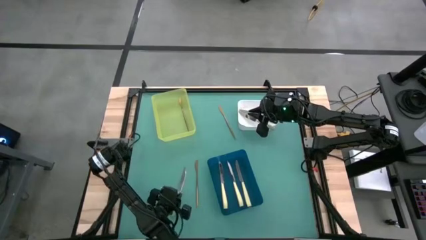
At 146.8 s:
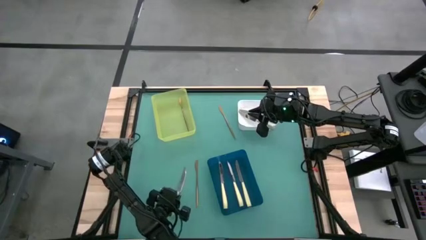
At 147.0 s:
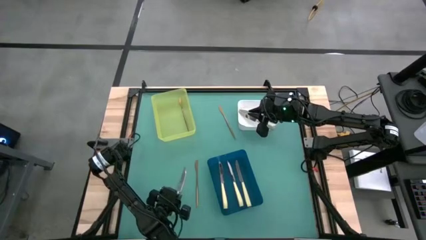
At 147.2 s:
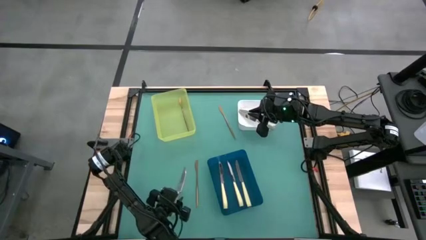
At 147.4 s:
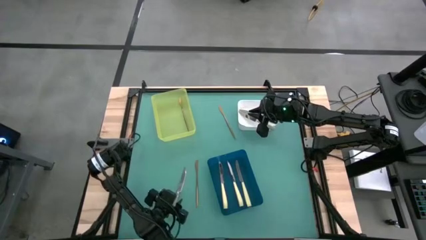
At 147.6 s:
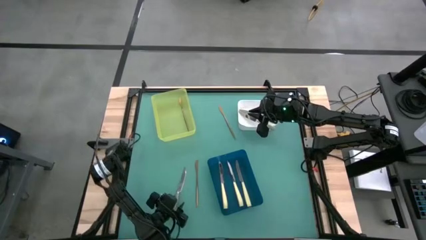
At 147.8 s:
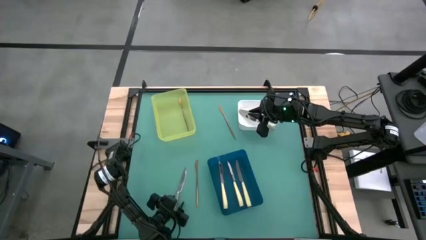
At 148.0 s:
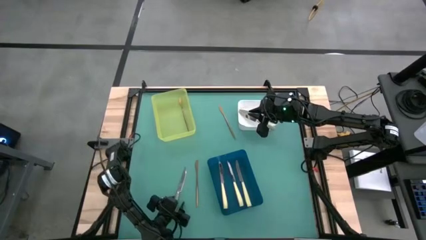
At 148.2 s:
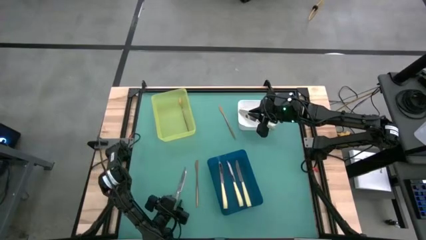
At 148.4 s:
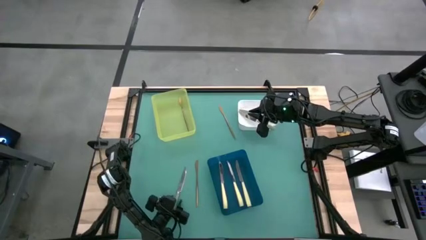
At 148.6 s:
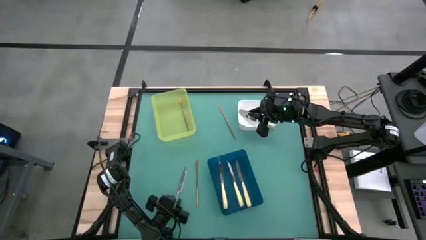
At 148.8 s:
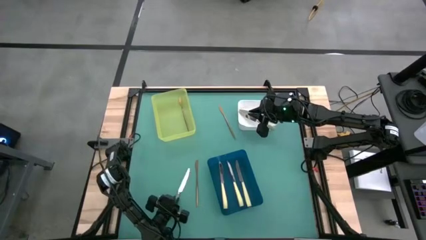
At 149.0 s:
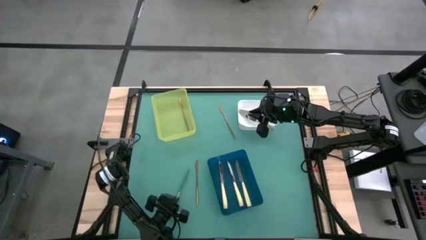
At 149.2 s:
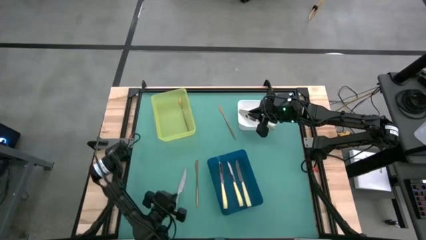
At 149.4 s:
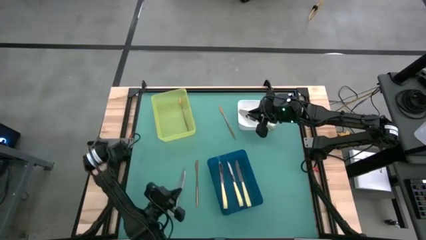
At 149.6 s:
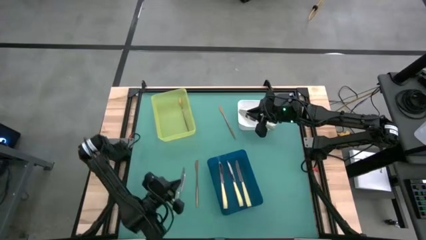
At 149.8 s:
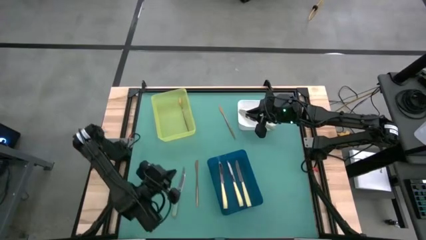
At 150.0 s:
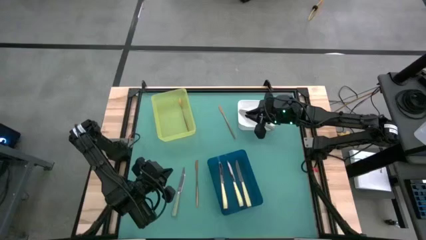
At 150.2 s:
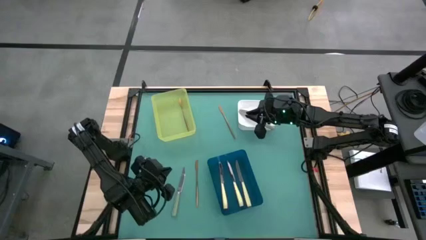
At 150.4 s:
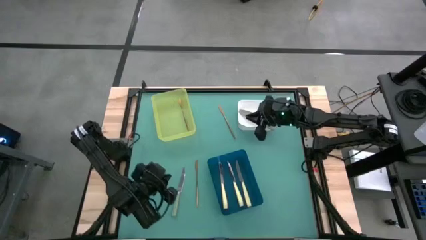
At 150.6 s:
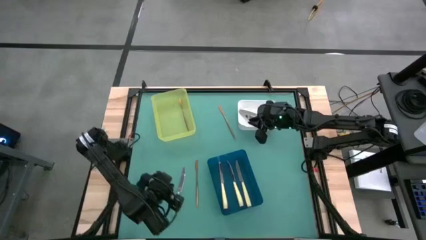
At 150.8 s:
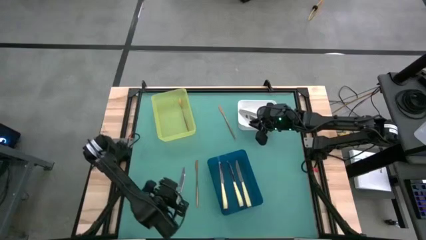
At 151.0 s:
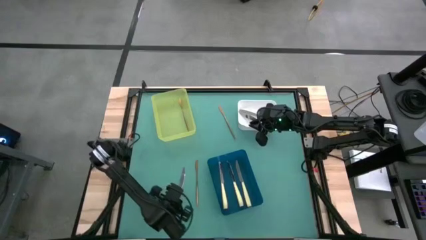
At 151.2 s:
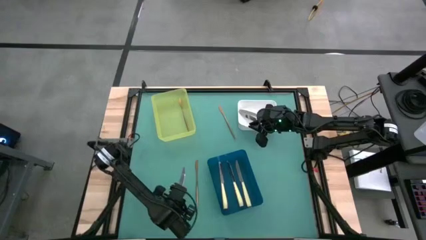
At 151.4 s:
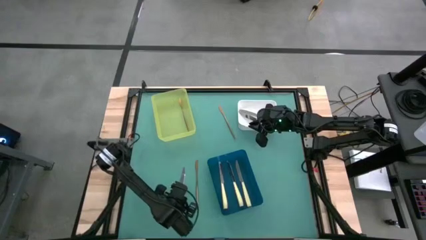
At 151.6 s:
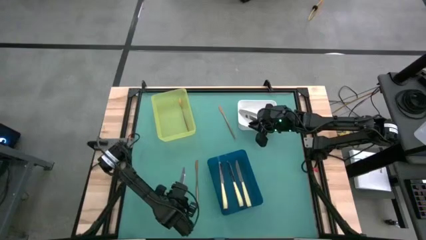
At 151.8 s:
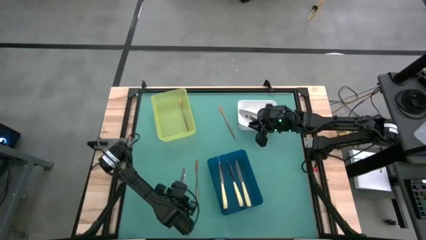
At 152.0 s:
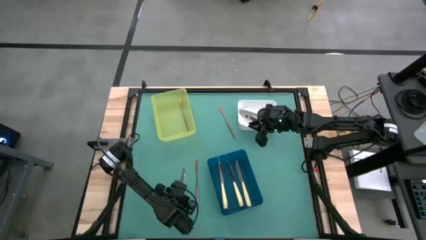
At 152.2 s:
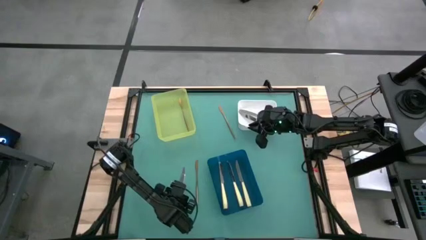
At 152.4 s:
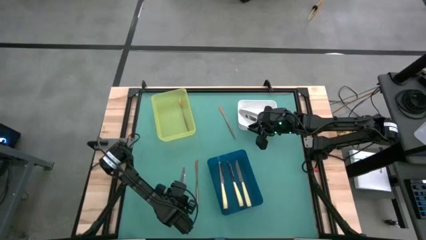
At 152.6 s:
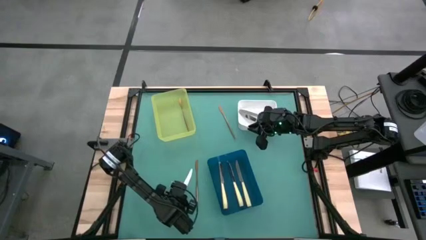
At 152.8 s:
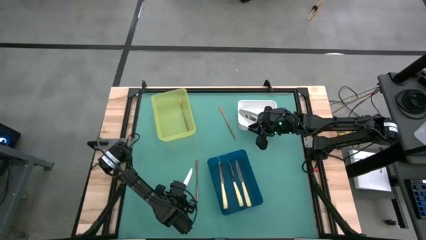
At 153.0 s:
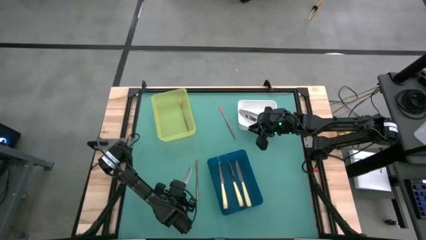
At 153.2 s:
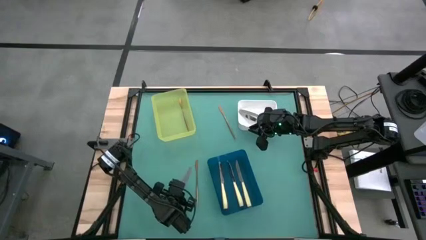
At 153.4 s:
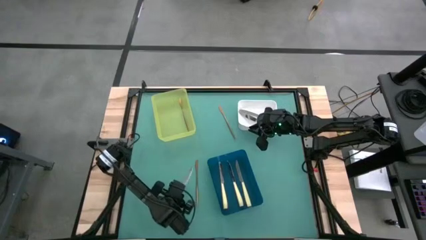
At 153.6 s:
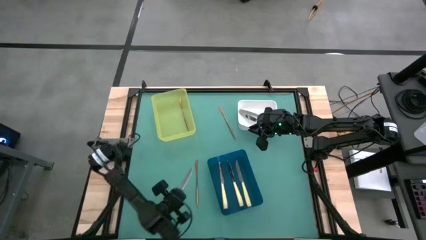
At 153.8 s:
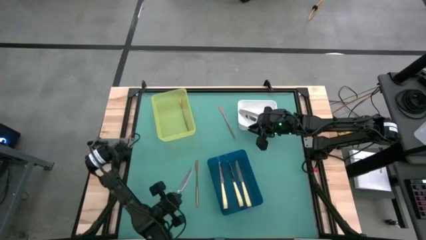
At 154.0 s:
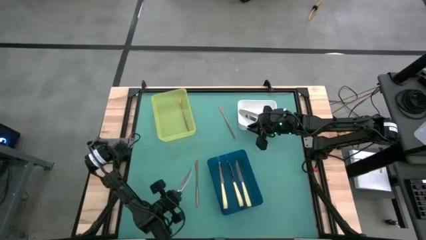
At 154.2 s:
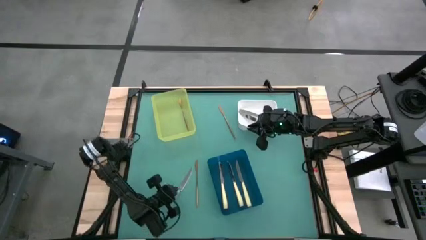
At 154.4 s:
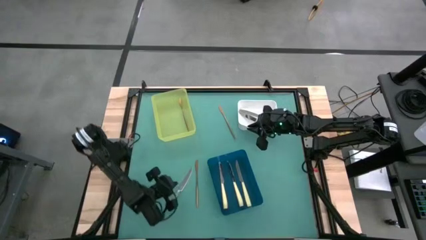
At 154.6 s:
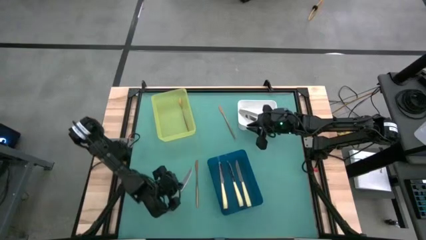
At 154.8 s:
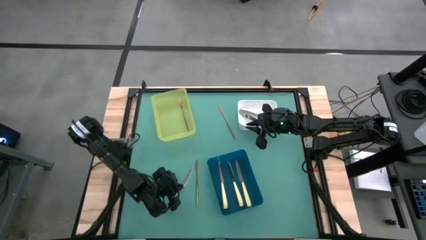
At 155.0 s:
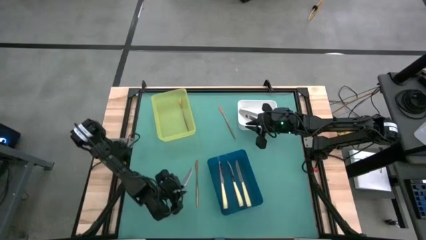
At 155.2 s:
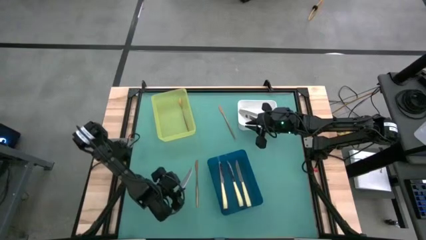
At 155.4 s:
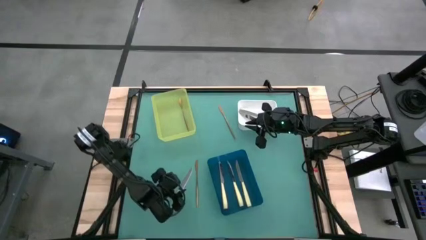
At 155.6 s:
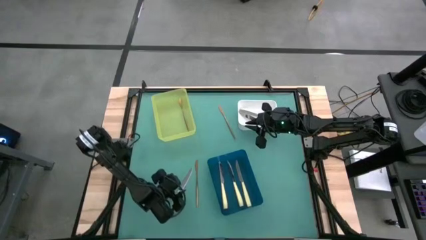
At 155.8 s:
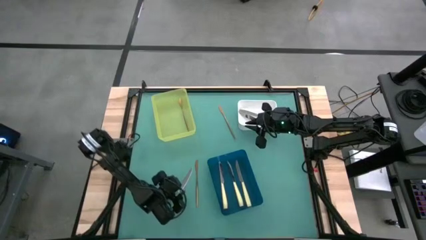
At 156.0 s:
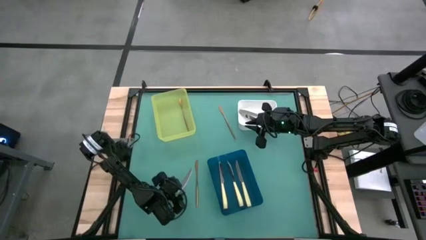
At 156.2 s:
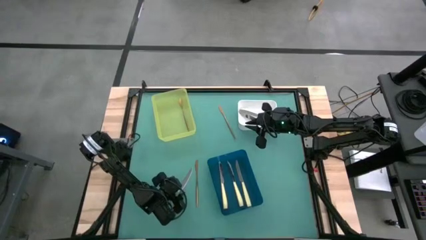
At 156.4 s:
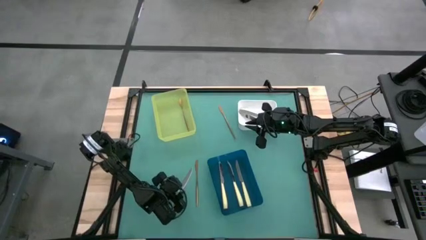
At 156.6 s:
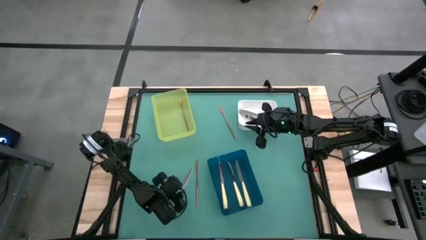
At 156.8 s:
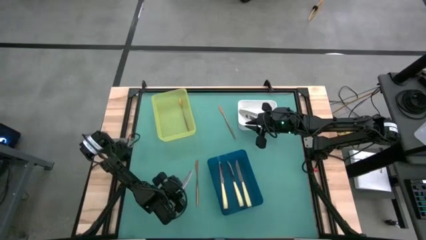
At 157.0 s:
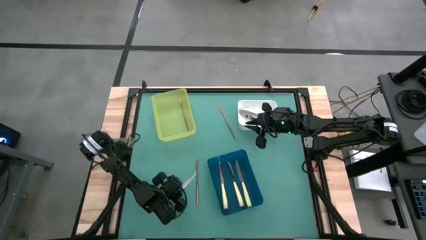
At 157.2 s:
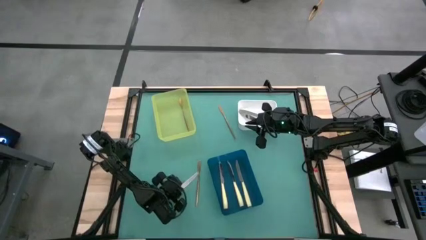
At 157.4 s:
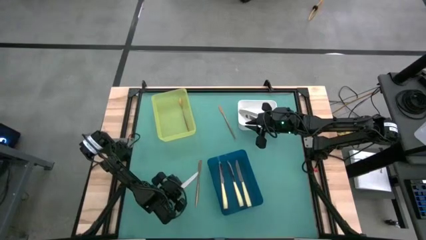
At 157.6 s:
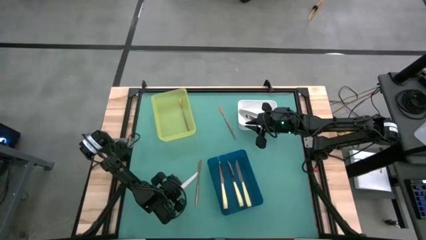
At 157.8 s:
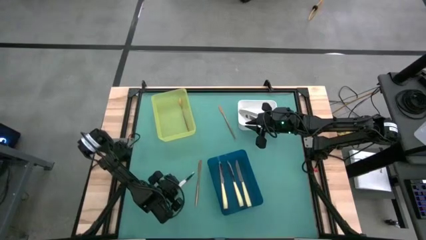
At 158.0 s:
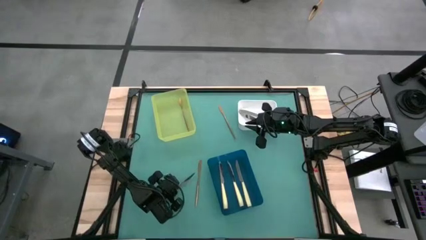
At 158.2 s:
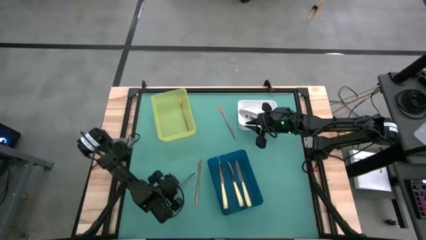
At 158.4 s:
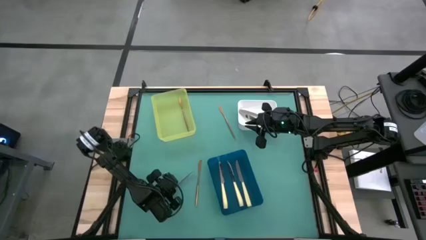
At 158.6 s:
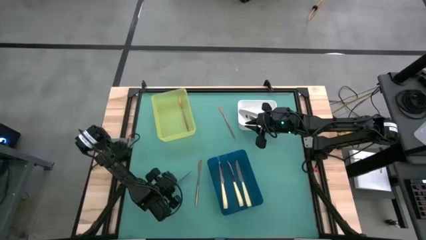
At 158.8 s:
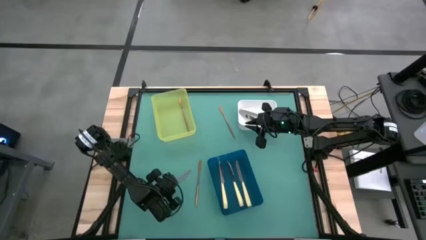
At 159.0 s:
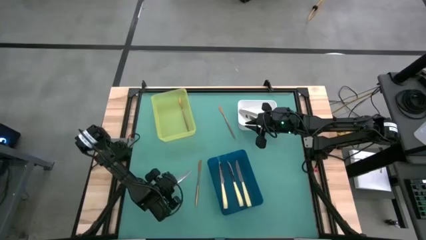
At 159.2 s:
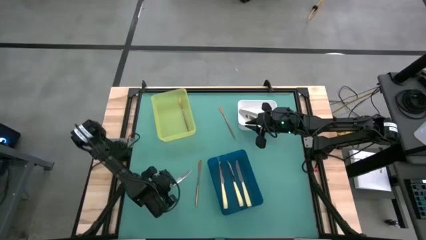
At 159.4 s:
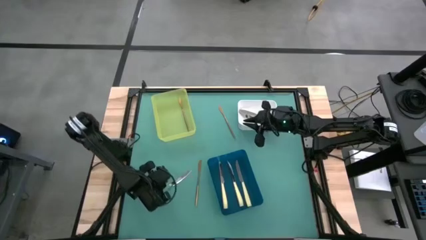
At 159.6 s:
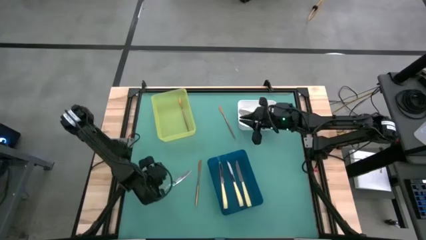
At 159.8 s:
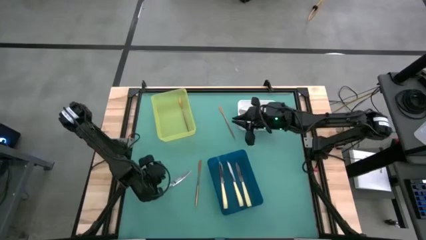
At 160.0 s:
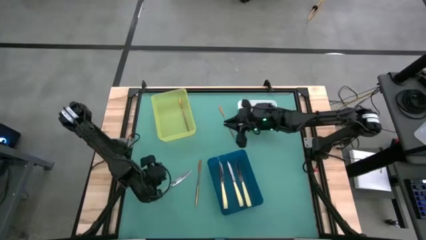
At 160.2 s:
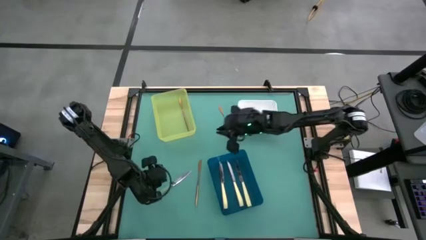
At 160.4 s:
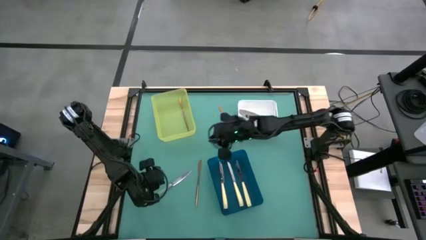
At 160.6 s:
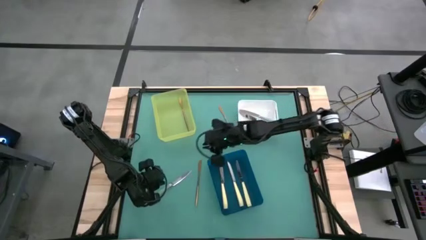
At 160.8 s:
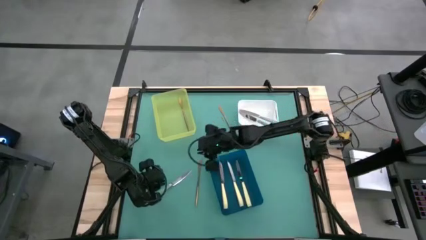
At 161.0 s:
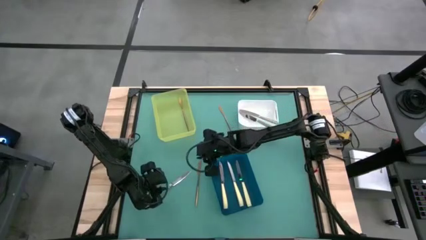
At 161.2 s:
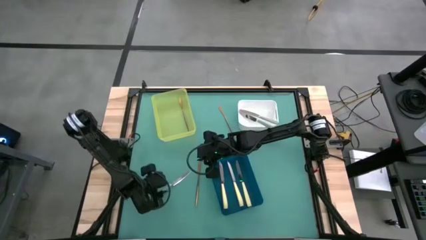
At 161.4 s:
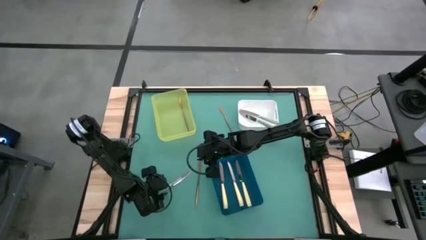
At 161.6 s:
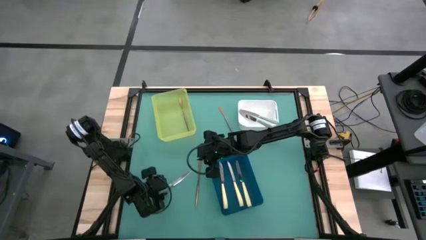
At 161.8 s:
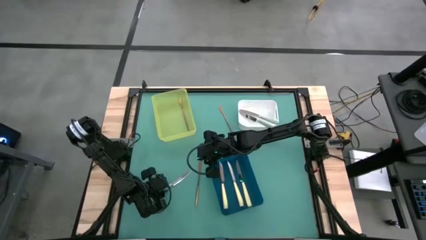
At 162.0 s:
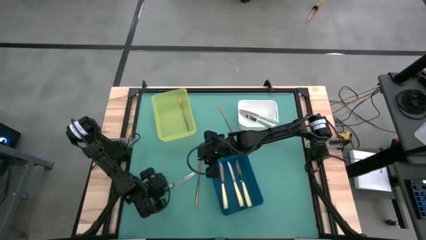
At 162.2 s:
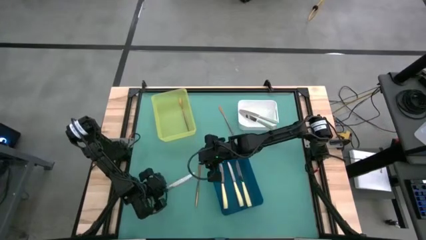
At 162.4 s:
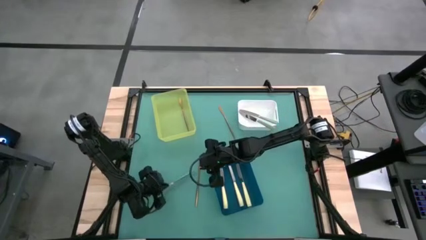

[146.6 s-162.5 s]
Task: Sort silverware by color (type)
Put the green knife into the white bin
